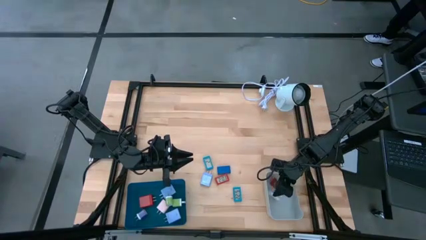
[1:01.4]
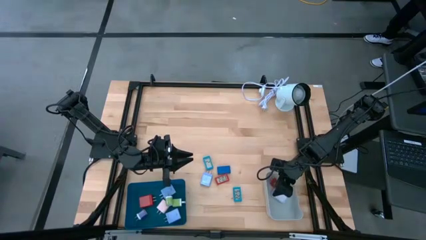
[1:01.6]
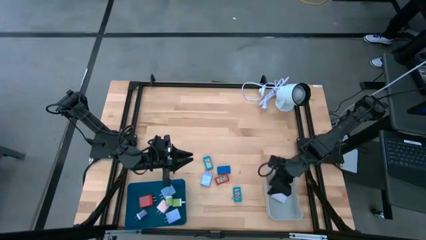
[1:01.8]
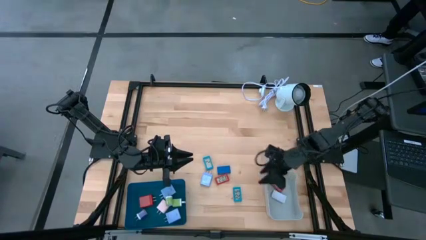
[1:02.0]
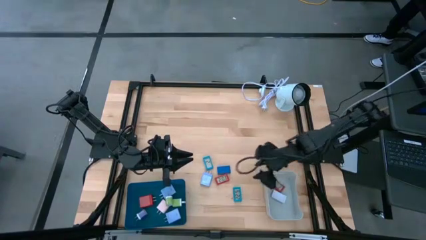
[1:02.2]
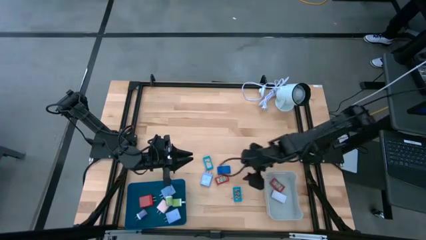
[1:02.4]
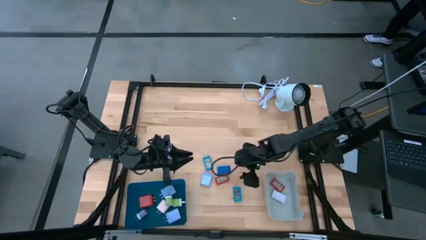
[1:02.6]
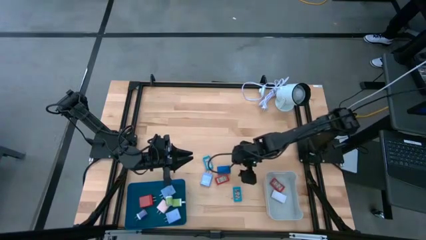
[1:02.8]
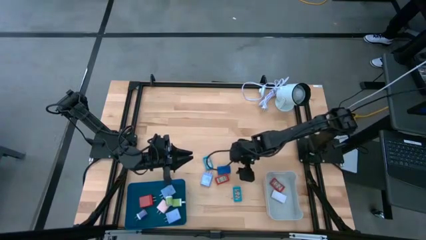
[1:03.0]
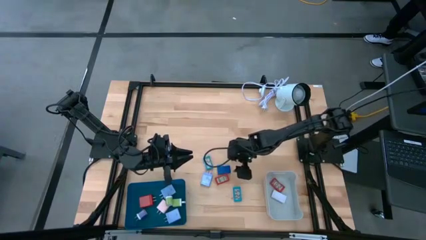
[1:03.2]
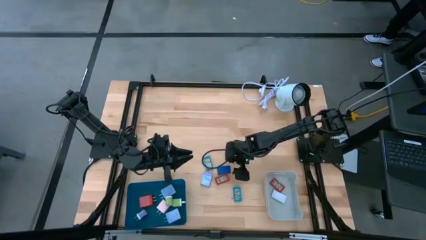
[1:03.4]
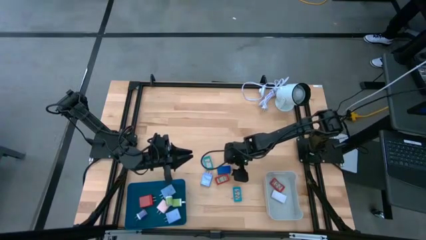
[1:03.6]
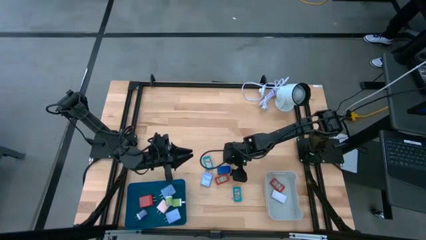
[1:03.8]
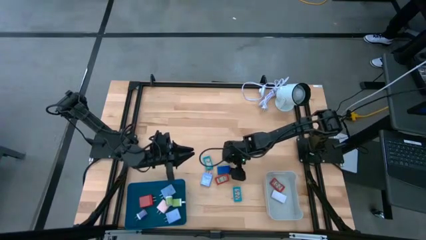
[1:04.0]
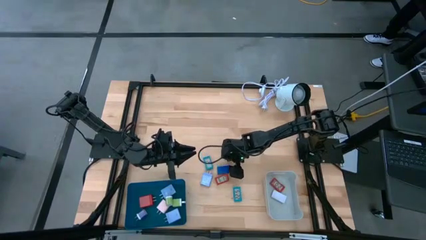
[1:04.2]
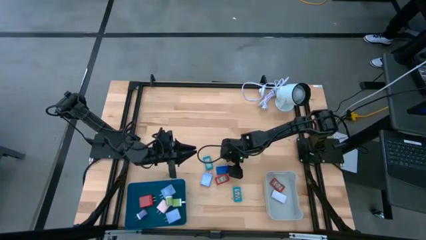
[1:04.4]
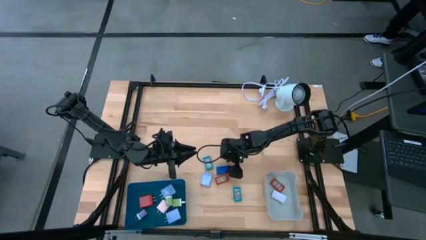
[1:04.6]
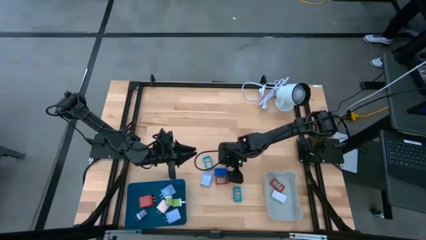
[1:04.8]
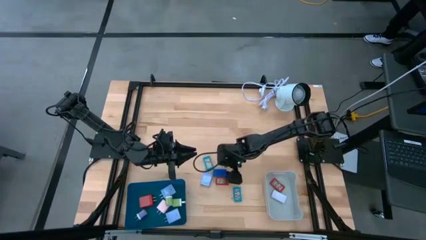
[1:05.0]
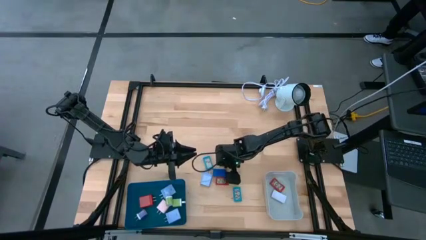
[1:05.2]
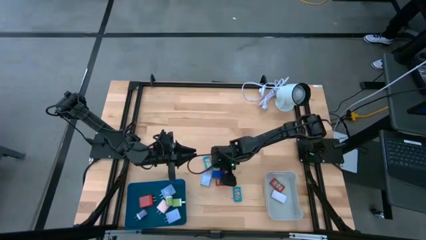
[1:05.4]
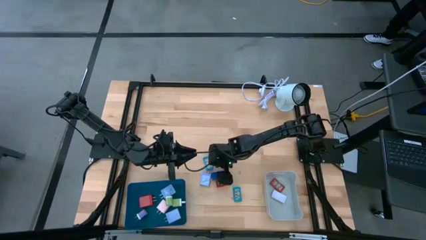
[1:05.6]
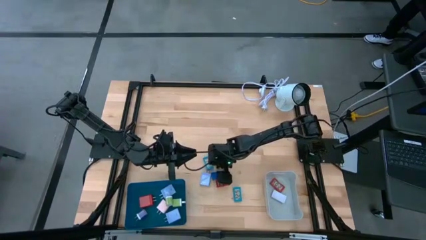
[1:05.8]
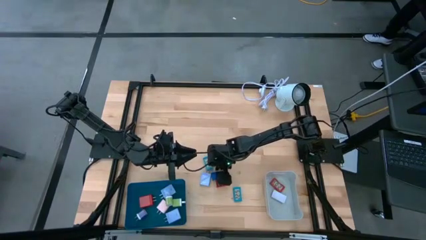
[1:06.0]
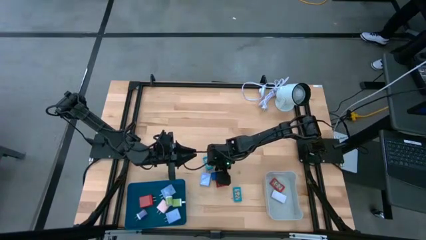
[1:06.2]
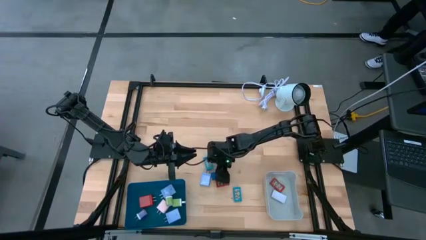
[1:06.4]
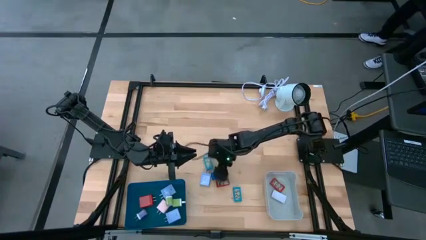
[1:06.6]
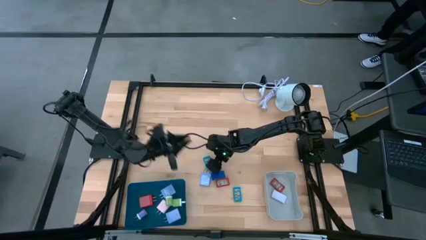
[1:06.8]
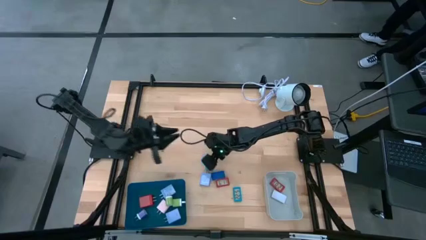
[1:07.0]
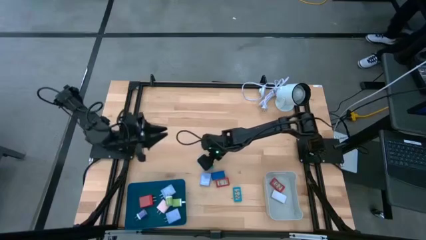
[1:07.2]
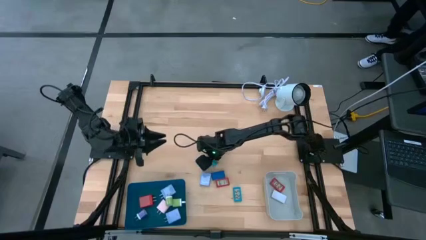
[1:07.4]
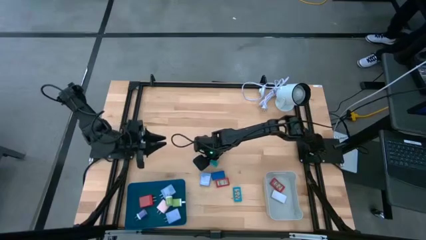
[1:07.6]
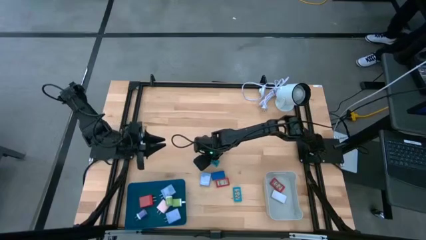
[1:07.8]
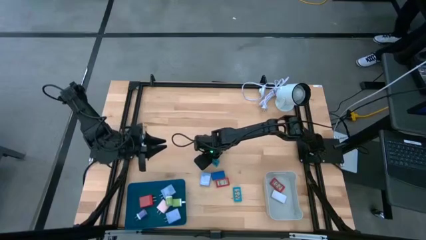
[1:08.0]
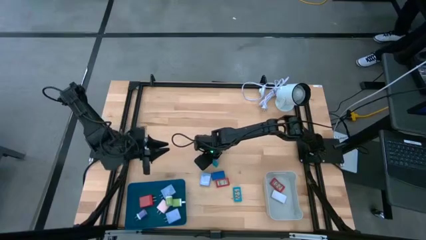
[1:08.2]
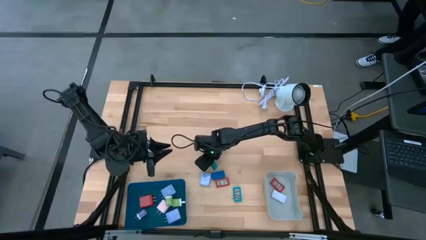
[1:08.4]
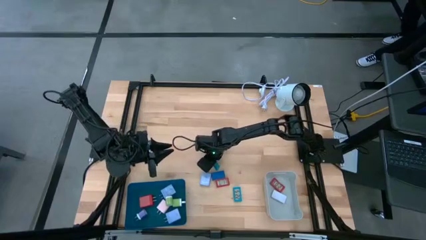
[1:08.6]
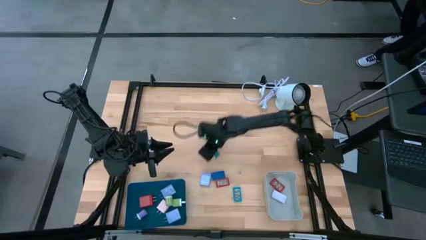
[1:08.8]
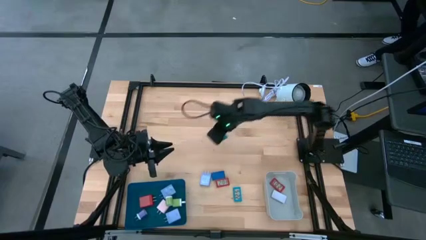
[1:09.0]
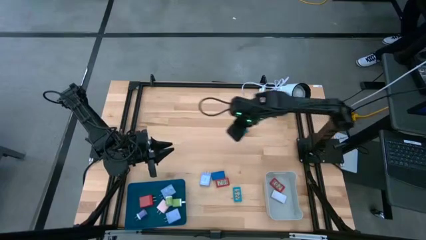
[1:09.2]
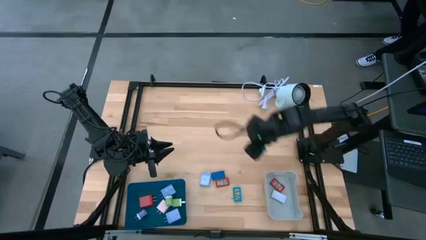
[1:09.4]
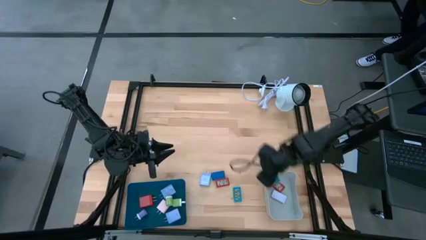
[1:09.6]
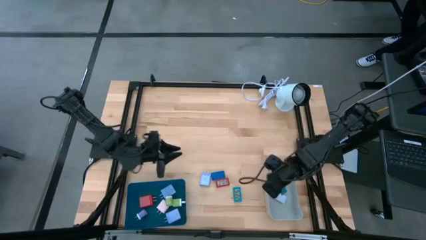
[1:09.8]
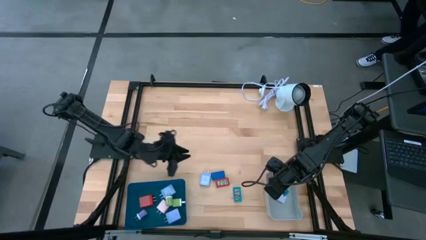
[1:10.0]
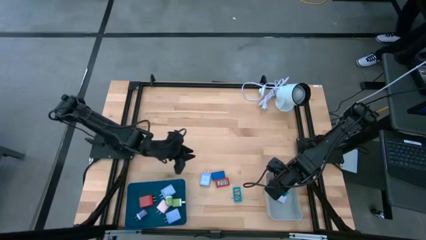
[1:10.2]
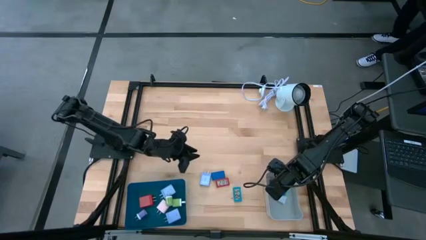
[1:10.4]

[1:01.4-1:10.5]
Task: Pick & Place Office items
Put the top light blue digital clock into the gray bin

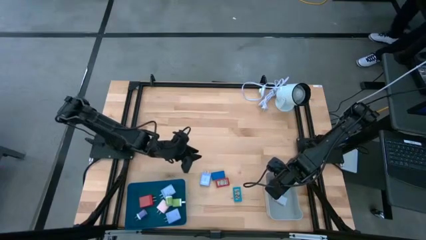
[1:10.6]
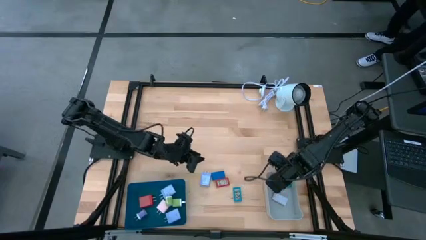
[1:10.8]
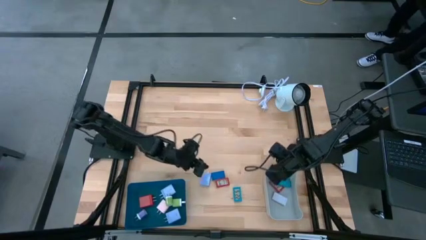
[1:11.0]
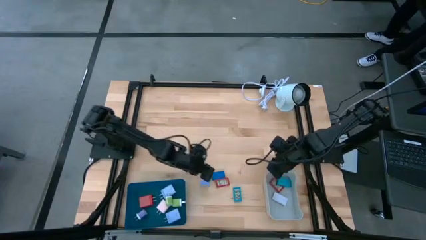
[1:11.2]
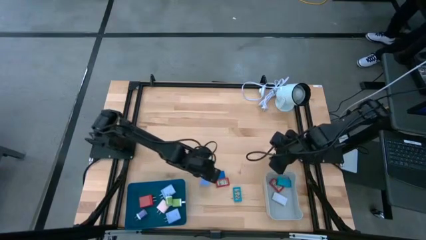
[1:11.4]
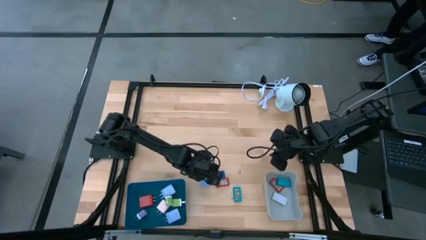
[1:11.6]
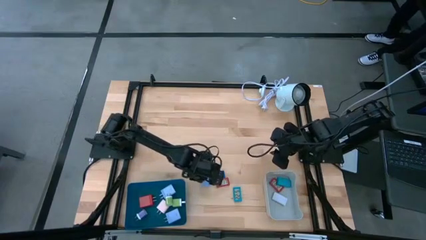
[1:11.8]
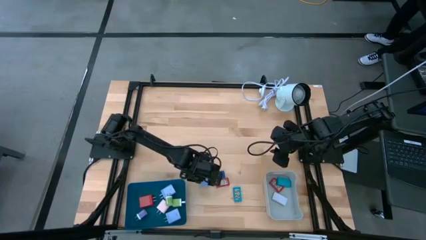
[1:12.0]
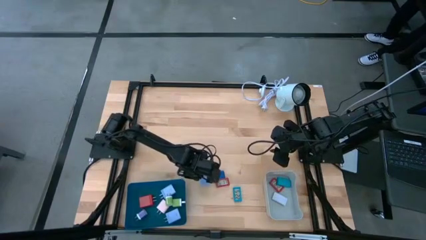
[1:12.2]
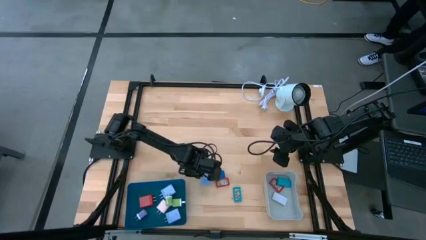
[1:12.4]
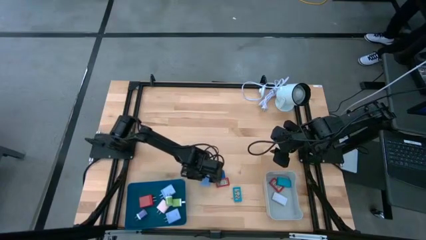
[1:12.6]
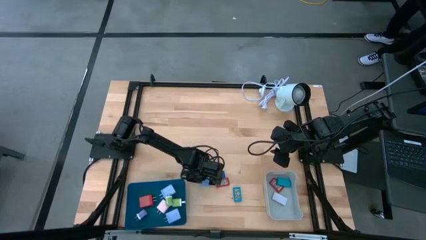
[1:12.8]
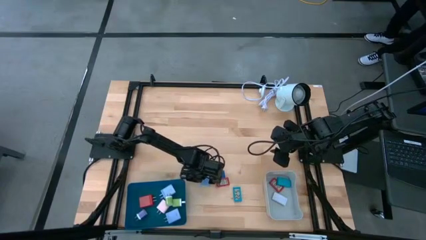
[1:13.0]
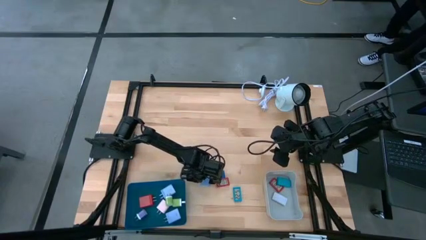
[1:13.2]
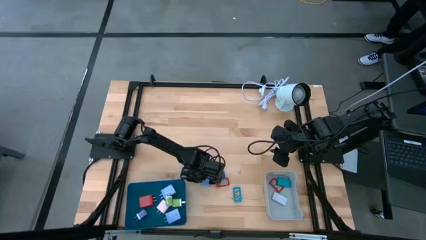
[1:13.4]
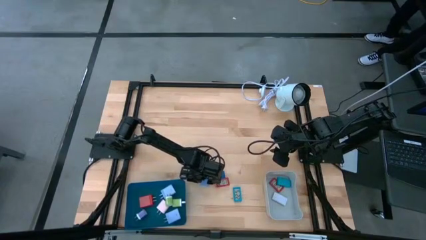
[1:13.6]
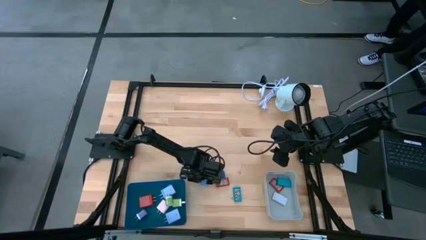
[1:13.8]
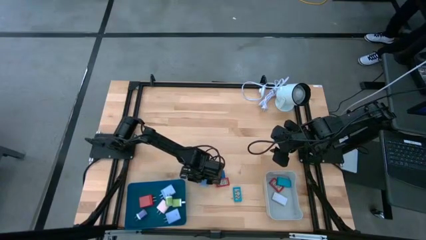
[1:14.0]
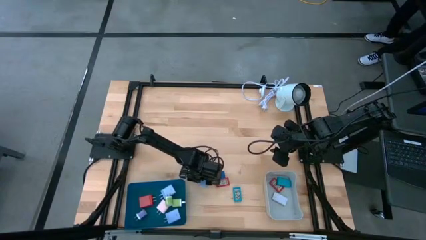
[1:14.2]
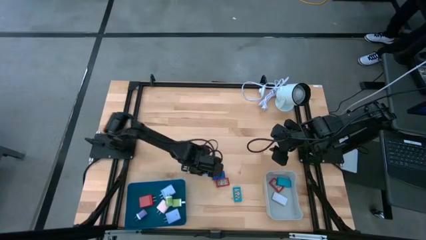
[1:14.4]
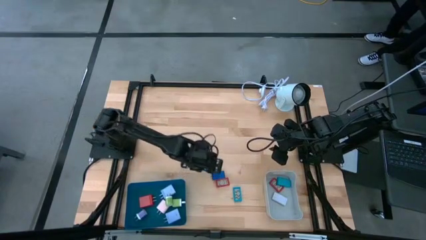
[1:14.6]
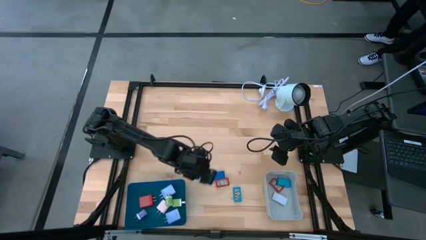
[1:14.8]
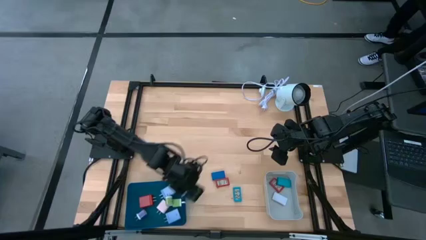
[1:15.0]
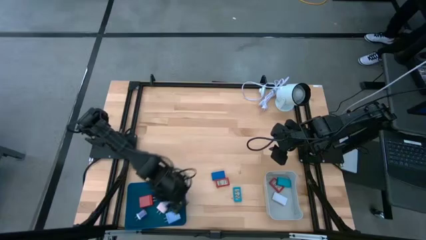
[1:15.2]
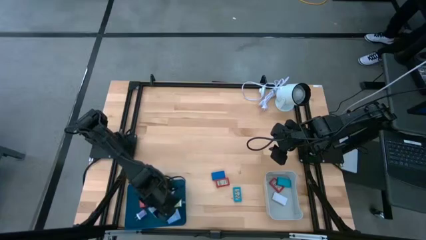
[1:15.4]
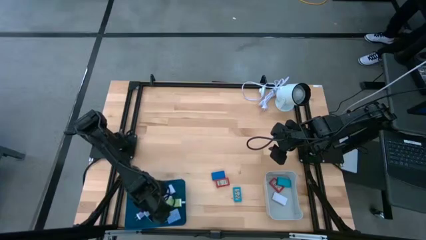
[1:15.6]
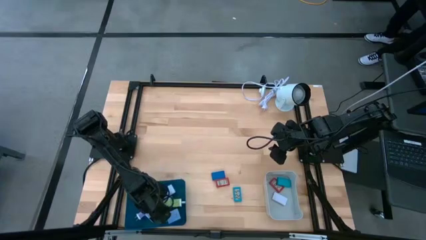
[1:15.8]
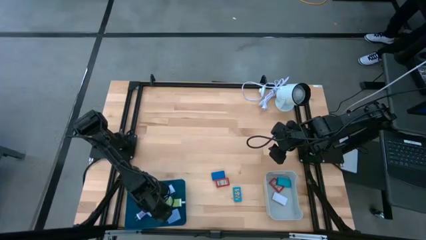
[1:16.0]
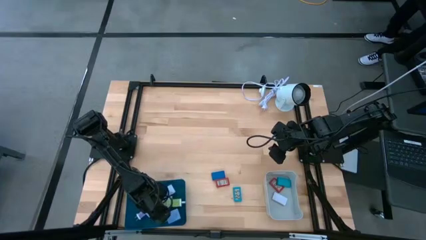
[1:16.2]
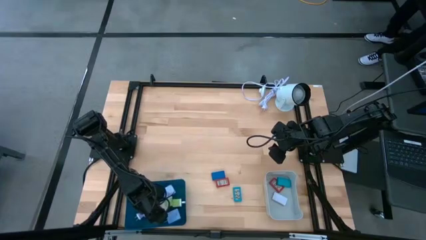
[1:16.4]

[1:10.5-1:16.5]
Put the purple charger adapter into the blue bin

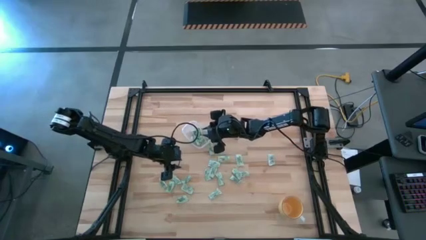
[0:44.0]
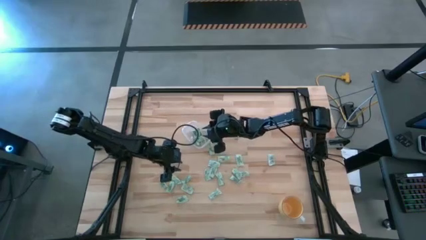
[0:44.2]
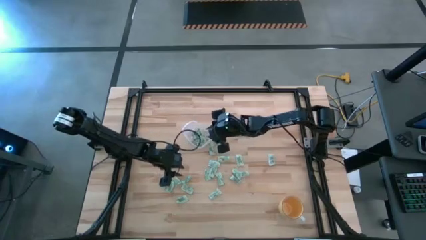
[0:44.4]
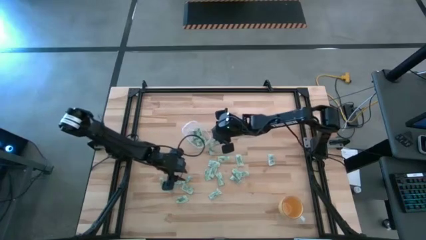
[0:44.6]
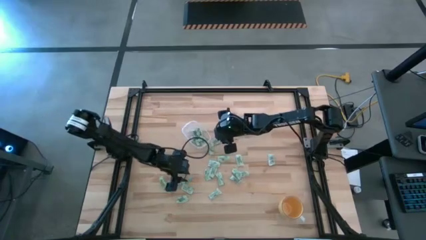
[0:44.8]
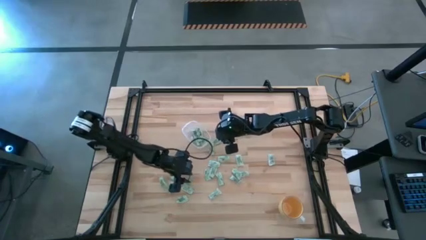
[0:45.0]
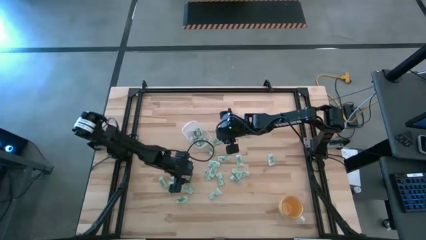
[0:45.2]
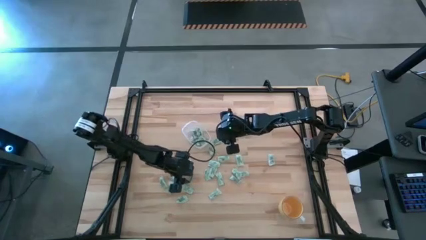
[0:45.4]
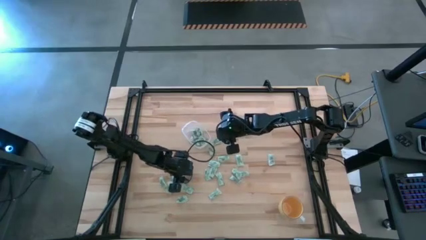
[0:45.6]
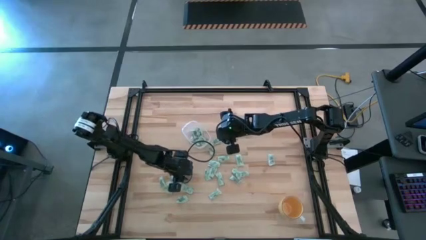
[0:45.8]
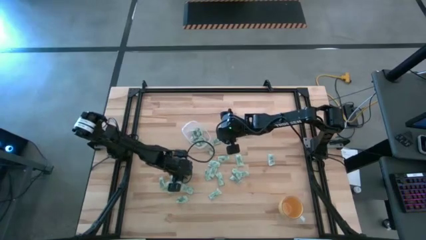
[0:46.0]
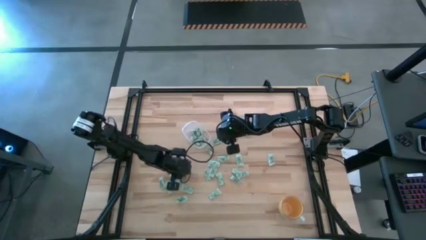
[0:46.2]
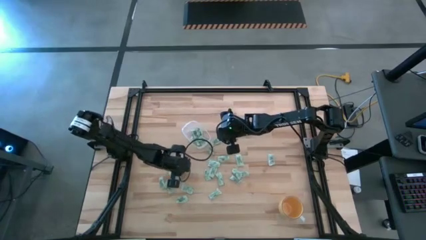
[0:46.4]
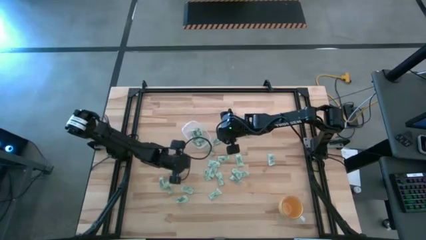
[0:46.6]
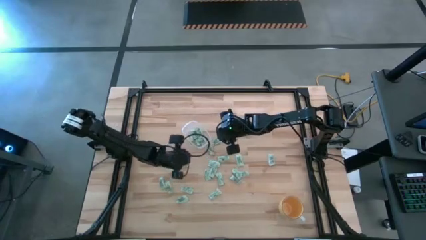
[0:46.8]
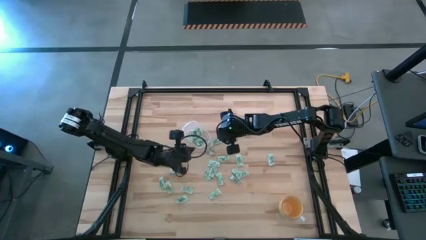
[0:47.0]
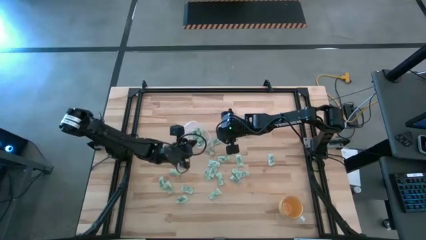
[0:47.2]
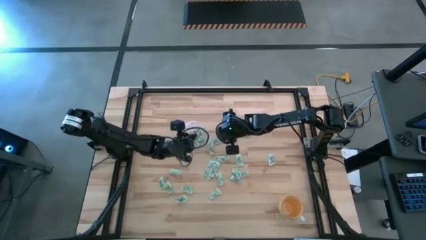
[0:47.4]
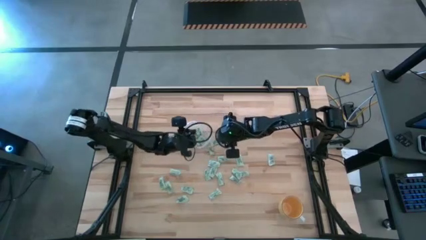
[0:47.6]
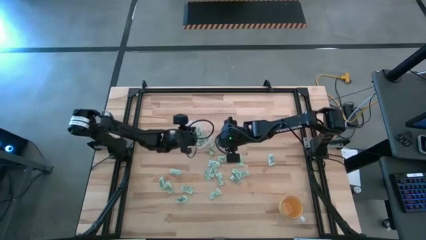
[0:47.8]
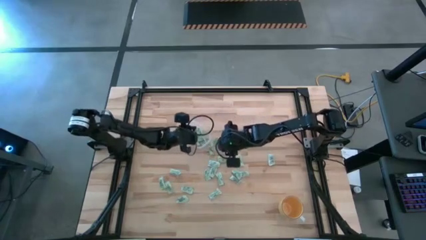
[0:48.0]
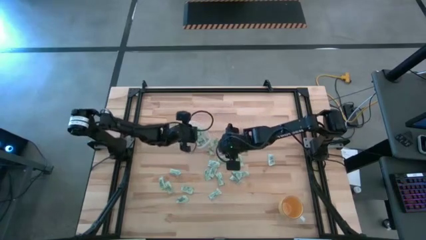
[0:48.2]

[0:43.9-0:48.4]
Task: Pick and place Stevia / Truvia into bins
Put the stevia packet into the transparent bin
